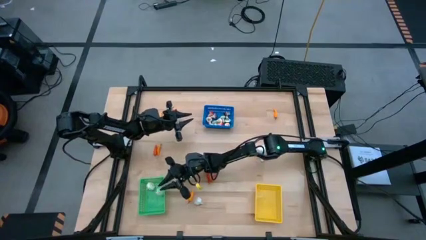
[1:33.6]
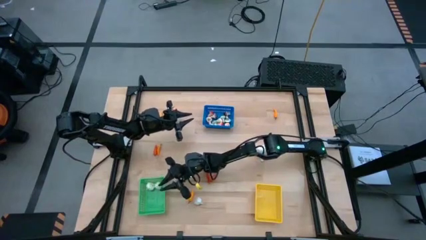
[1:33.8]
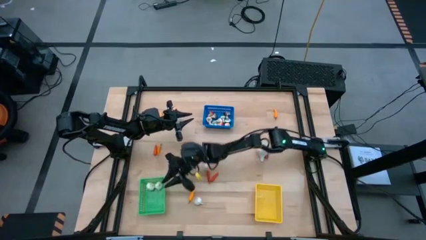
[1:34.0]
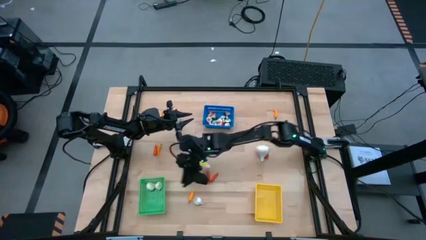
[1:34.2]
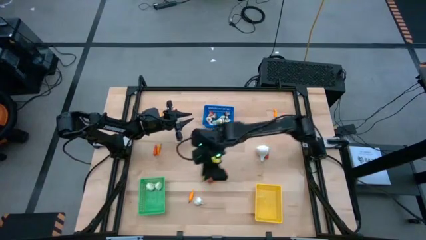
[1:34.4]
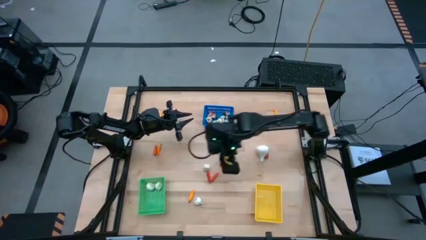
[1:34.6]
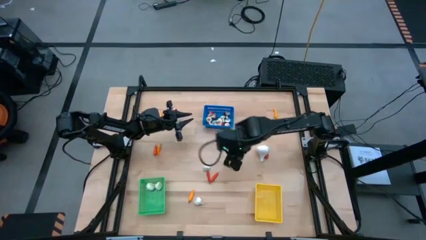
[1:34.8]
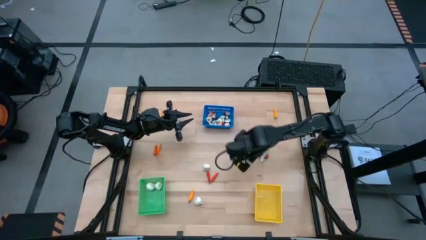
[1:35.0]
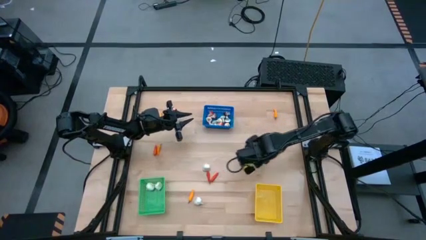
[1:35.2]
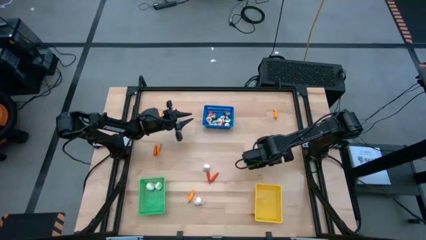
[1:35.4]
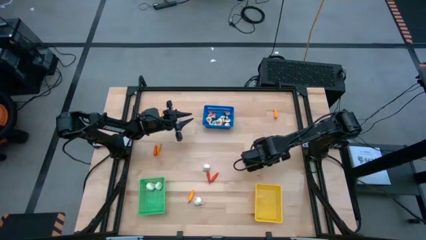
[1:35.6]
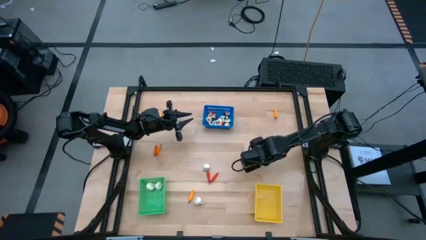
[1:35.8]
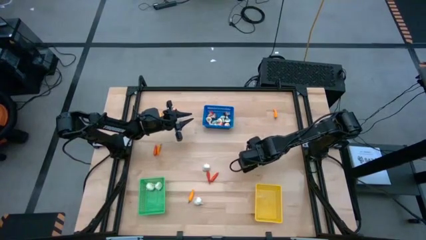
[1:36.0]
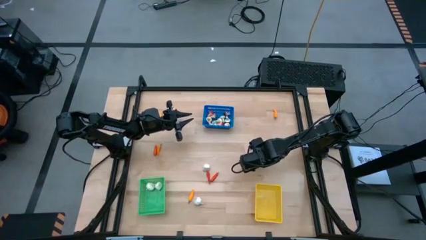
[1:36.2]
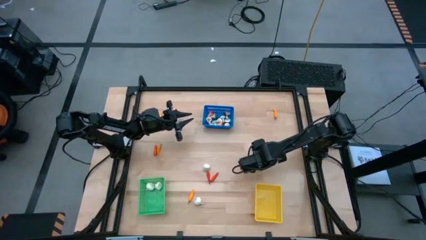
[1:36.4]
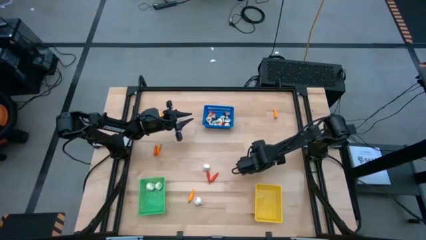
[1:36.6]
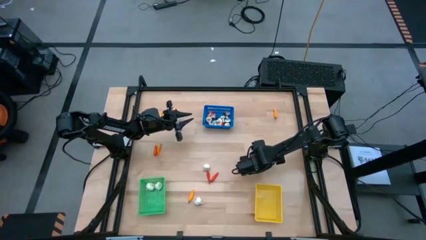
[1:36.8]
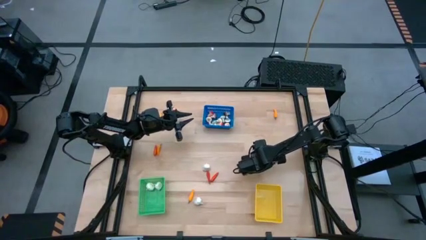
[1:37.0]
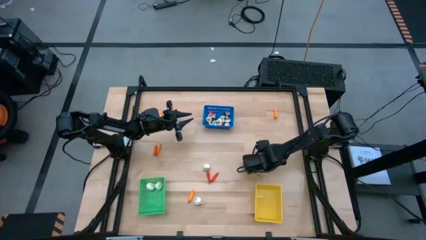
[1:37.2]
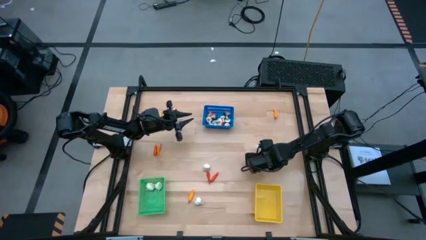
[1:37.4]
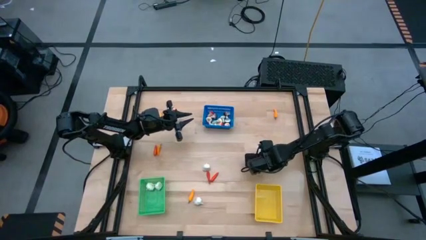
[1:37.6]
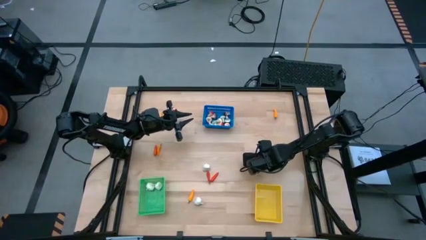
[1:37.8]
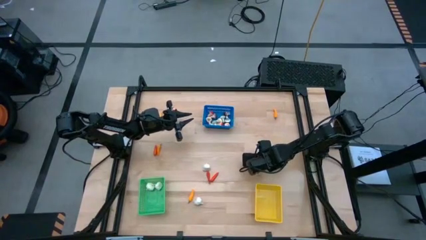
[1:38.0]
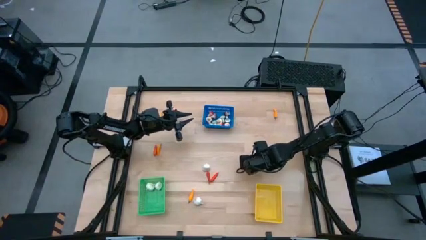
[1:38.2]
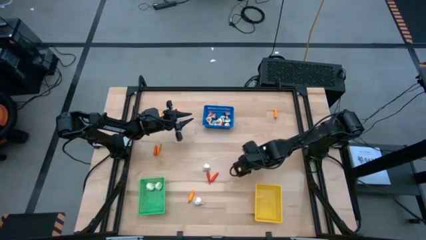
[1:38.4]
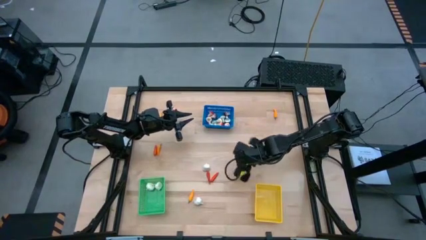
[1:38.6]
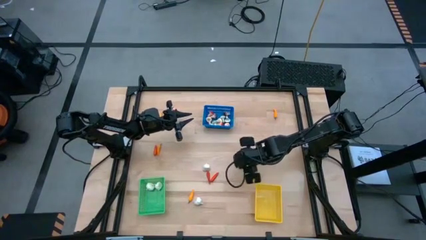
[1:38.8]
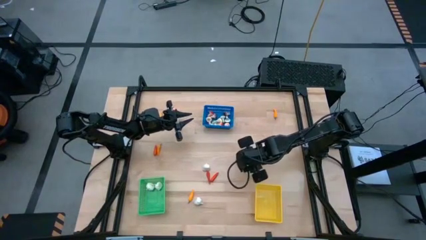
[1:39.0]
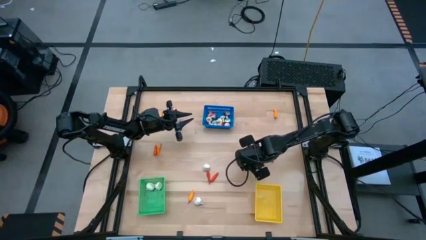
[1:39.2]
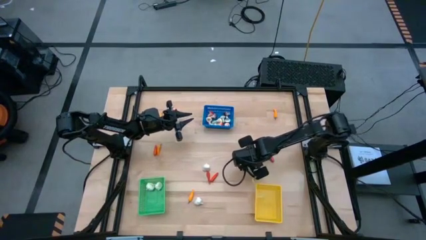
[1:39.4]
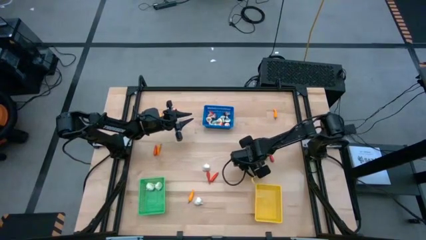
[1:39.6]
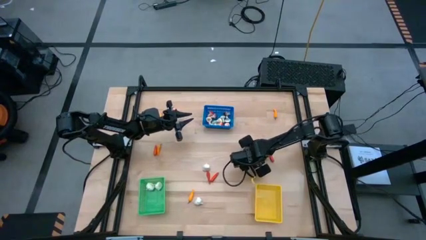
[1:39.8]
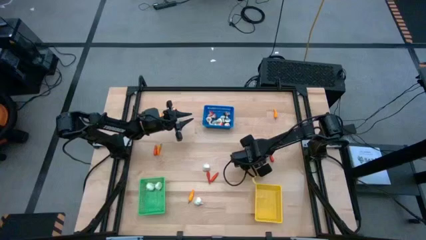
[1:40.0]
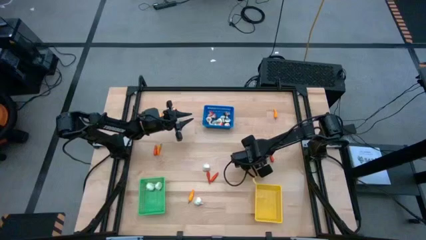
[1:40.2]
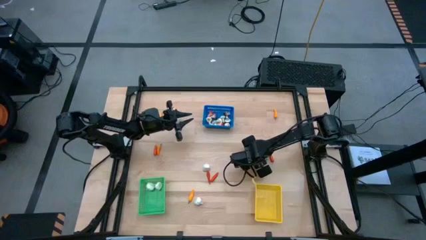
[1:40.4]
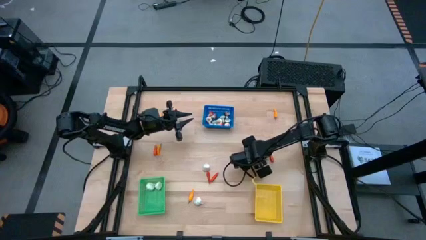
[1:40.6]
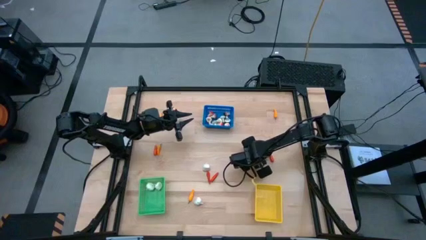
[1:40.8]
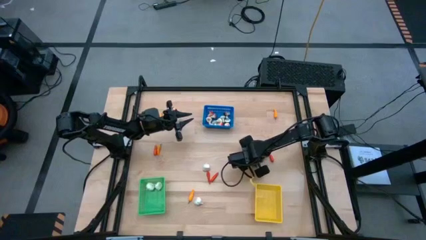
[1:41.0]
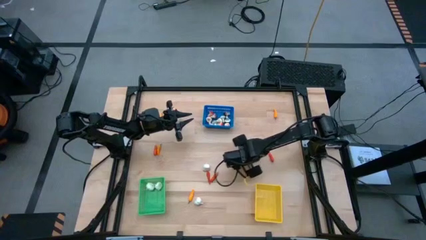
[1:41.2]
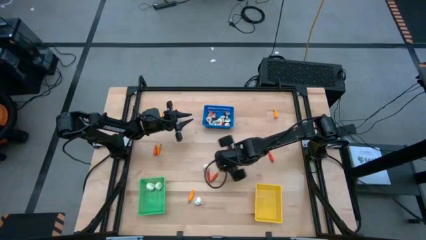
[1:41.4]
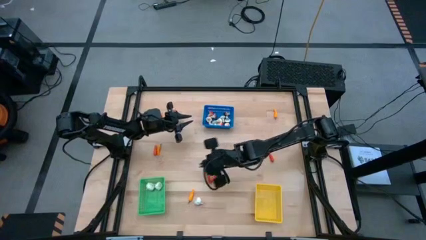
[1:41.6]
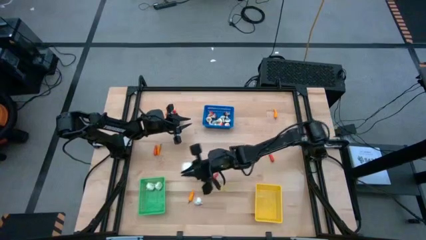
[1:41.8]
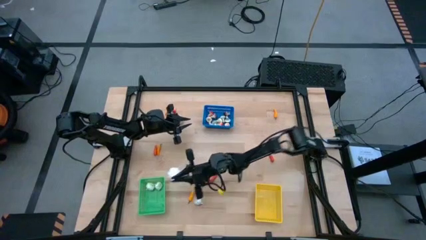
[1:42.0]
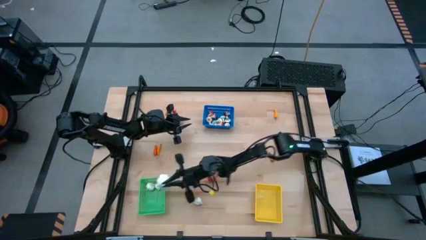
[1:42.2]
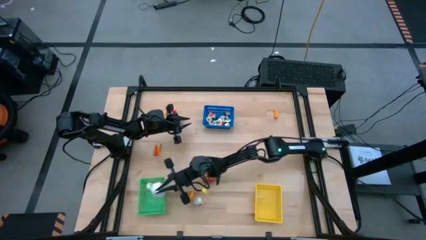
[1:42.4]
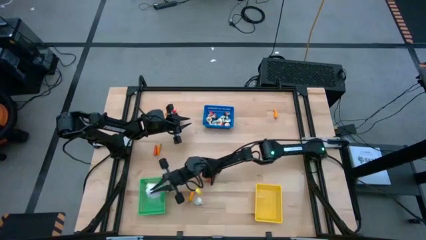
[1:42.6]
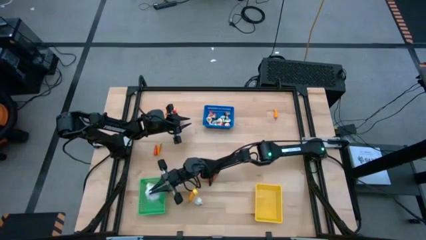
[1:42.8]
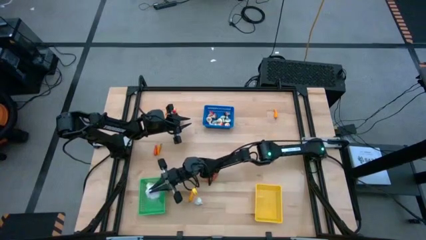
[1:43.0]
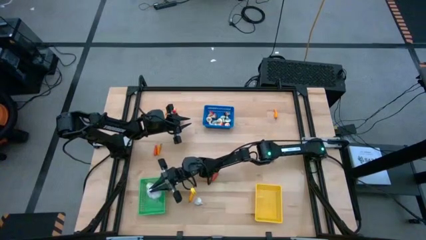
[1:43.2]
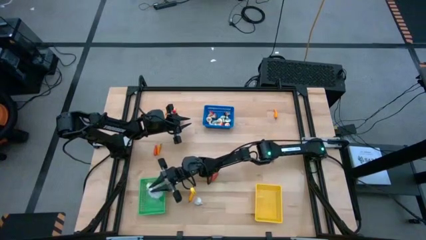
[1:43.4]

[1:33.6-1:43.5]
Task: Sort produce into baskets
Put the white garlic into the green bin

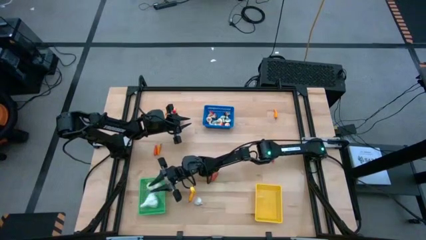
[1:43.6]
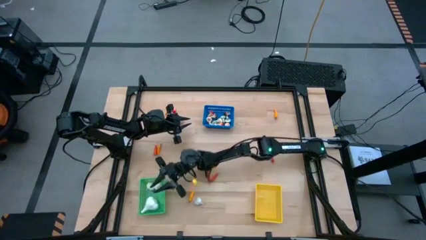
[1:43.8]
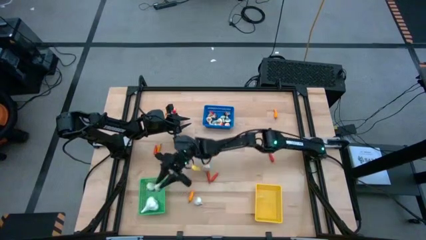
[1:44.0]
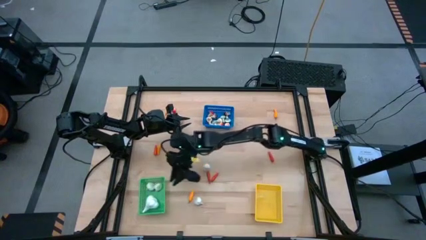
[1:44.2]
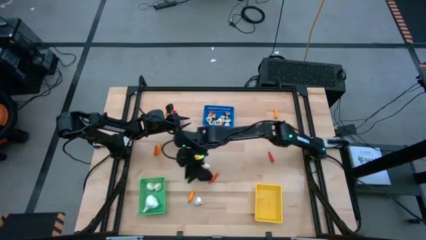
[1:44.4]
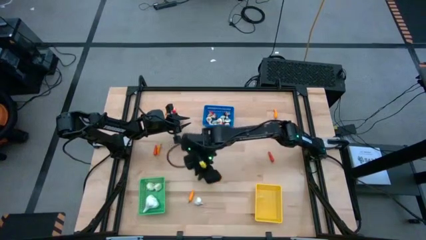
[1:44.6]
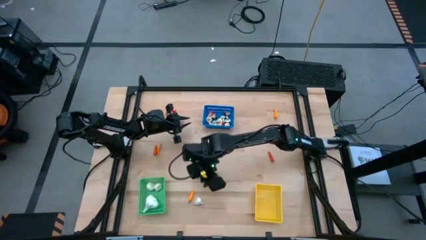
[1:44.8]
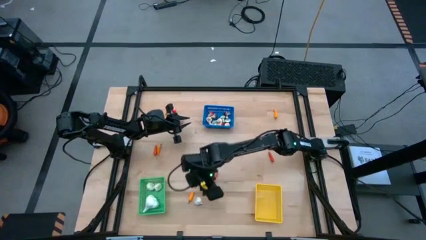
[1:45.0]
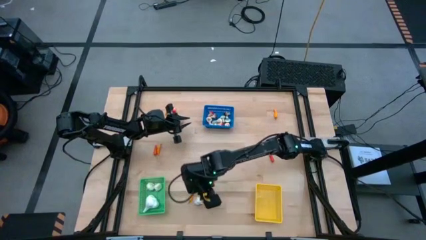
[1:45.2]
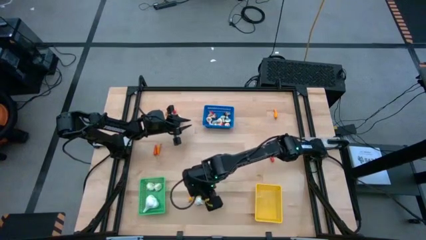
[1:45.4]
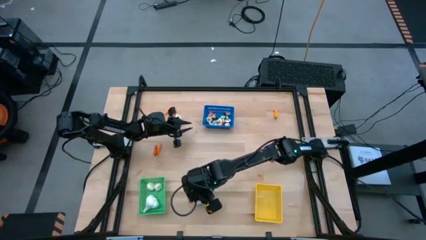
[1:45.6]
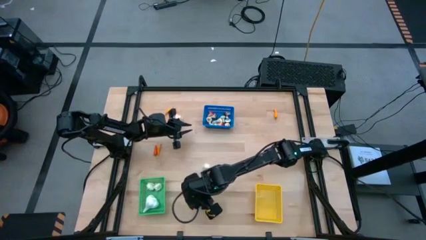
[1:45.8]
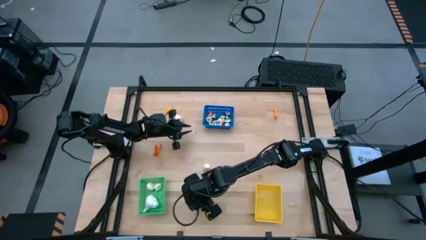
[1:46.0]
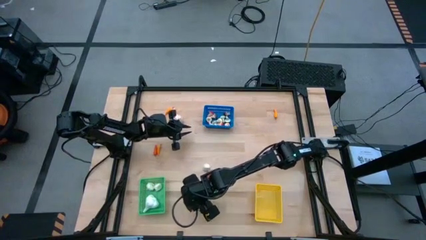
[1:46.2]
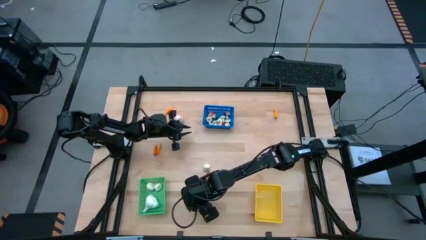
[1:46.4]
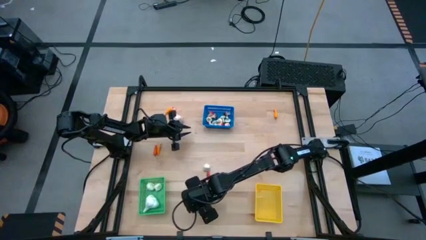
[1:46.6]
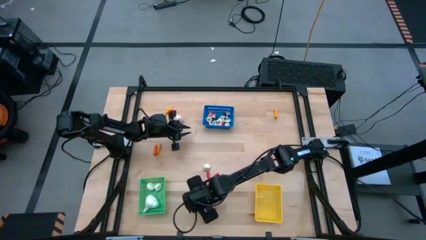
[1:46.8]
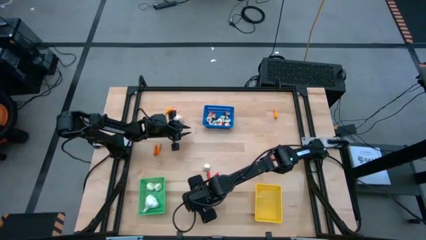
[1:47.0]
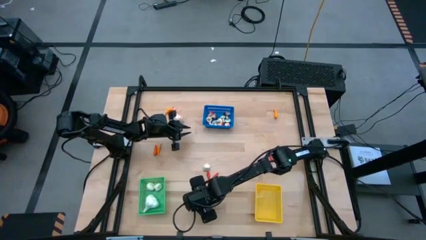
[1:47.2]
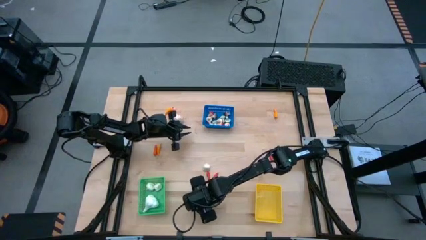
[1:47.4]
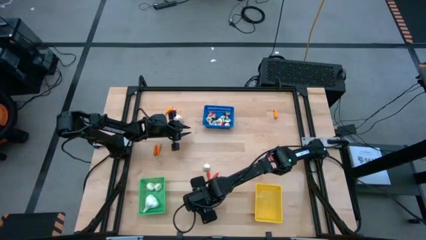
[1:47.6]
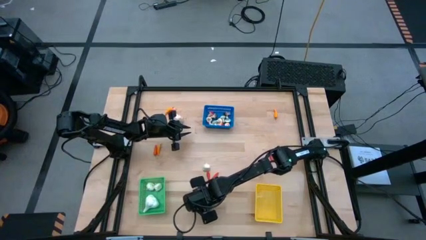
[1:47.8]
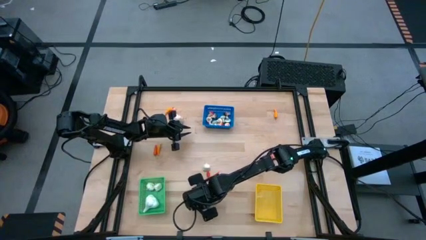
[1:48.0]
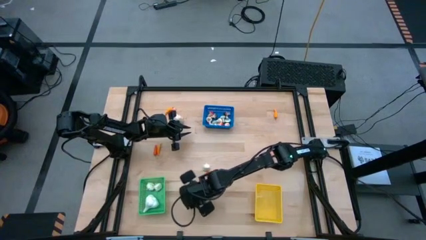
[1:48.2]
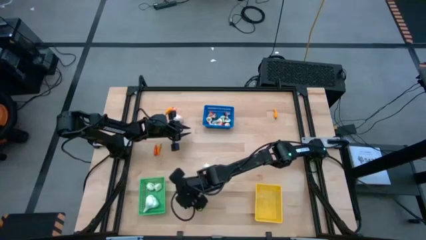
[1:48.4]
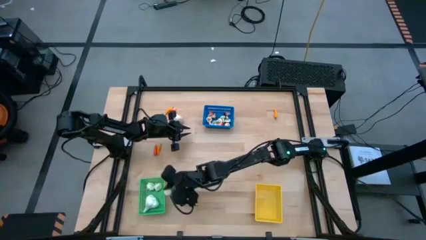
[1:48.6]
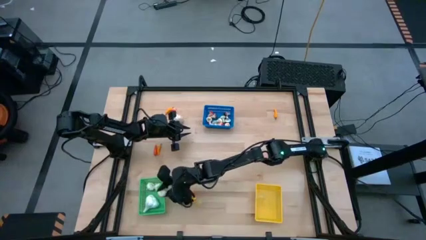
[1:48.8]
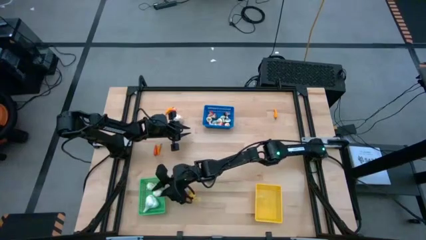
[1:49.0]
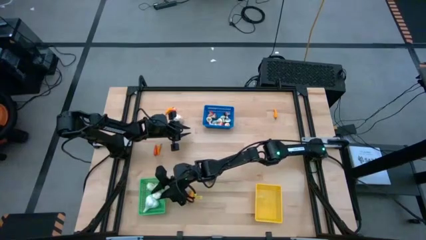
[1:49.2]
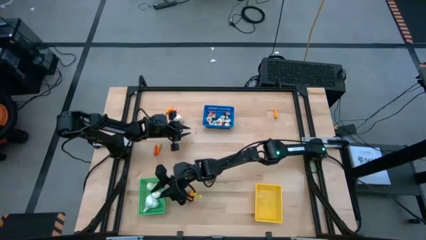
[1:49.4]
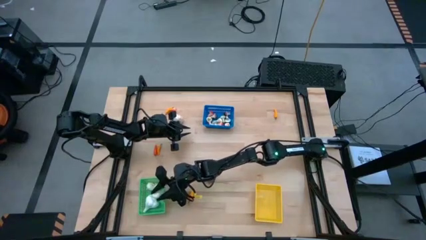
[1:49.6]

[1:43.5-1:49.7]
Put the white garlic into the green bin

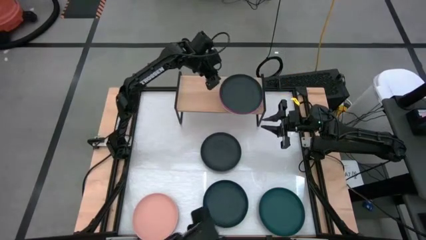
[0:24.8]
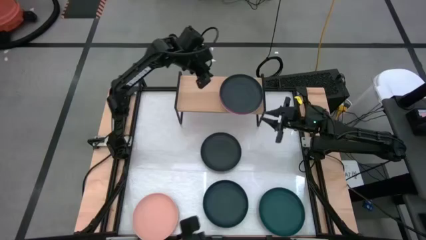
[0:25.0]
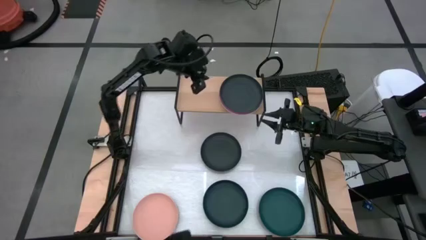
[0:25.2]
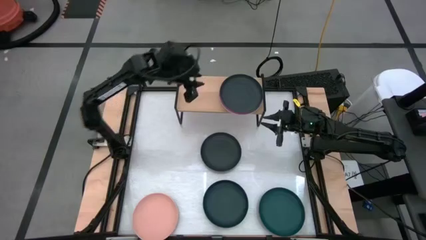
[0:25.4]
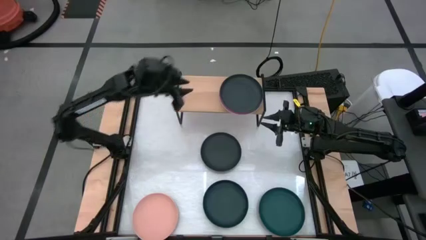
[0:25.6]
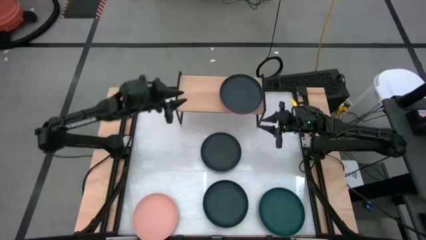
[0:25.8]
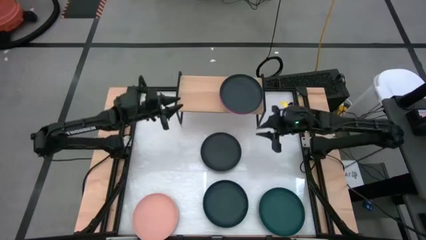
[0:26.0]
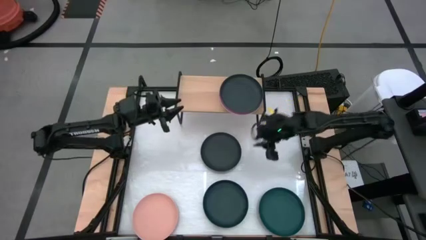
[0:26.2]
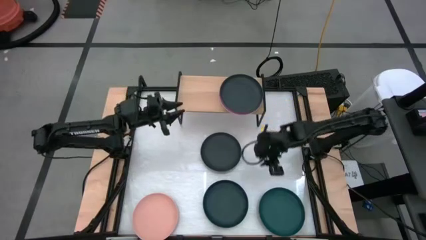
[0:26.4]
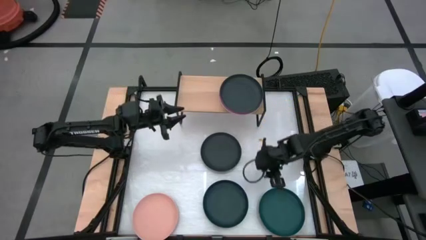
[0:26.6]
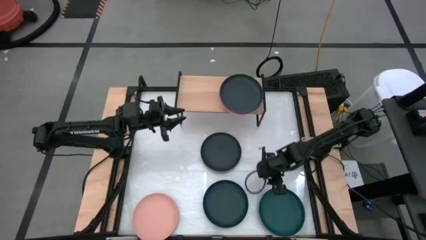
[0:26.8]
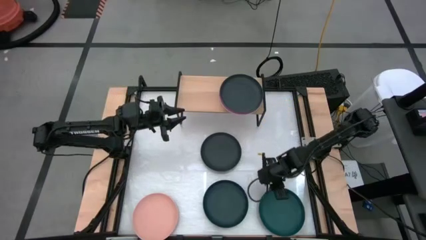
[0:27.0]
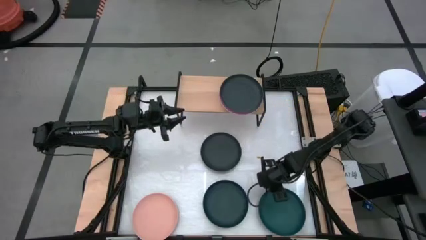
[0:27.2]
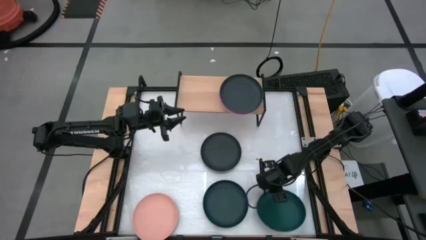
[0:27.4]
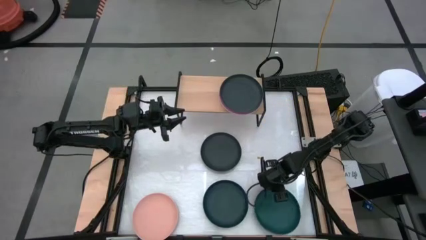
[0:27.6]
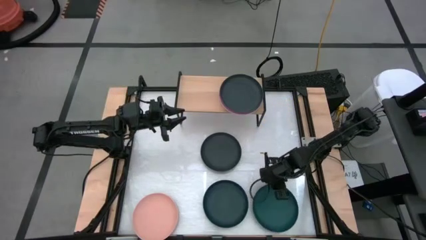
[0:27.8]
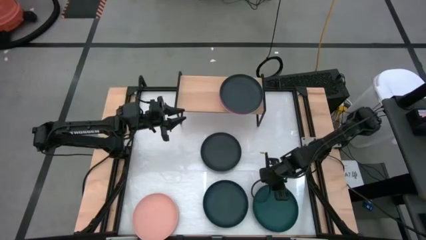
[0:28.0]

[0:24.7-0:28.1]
Task: Place and stack plates onto a shelf
Put the dark green plate on the shelf
